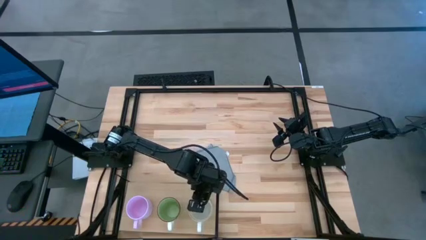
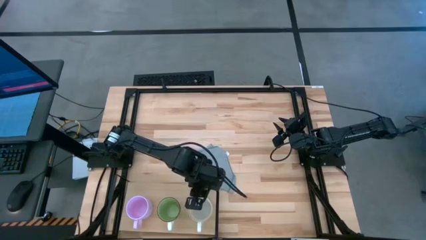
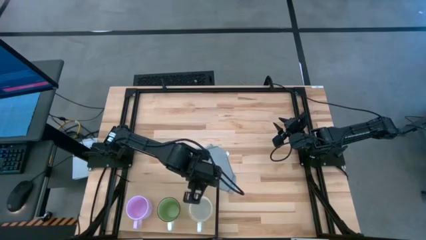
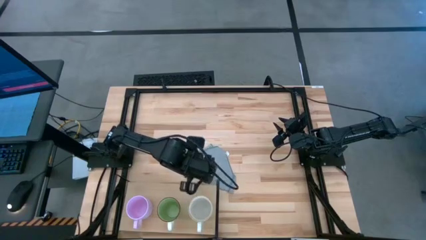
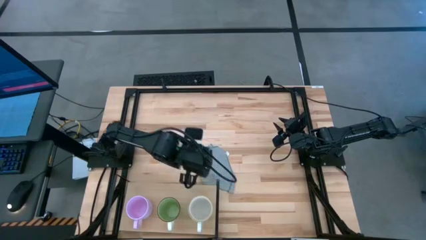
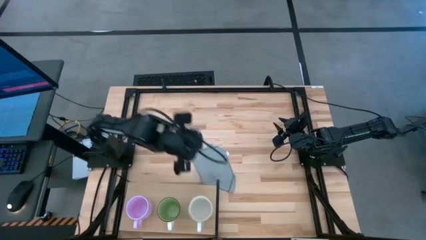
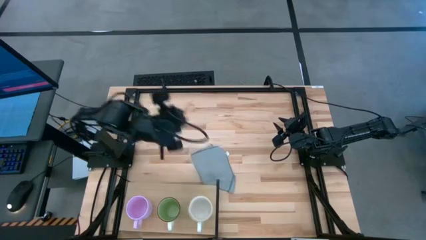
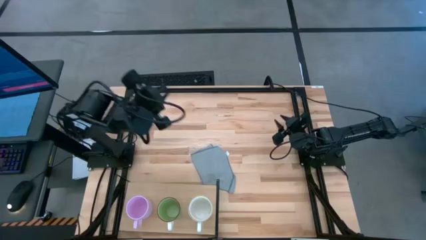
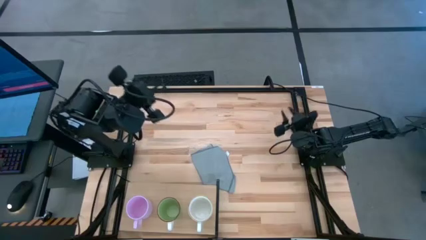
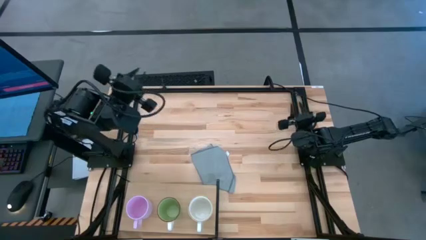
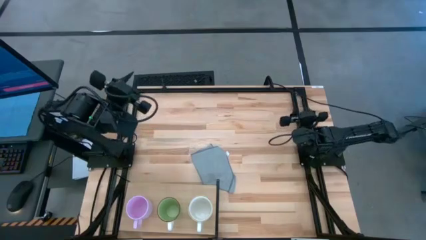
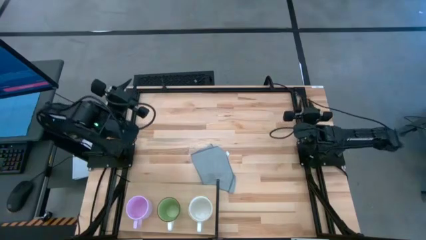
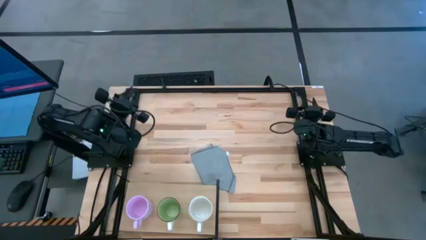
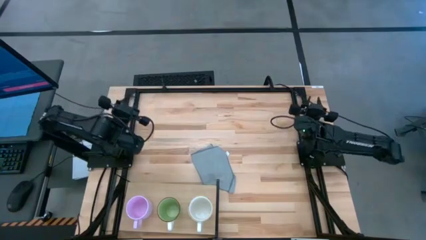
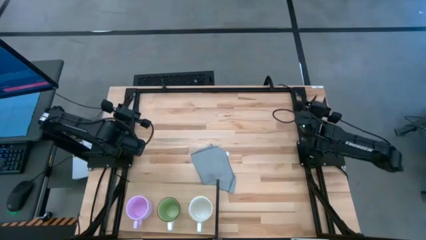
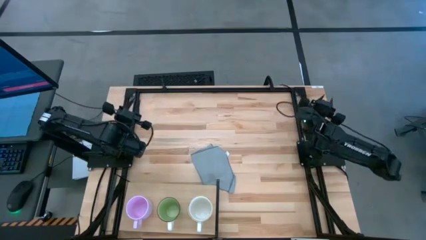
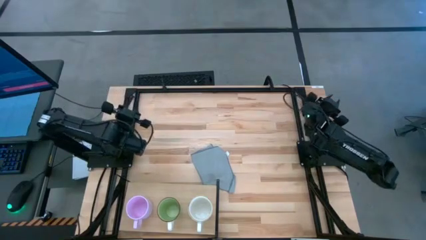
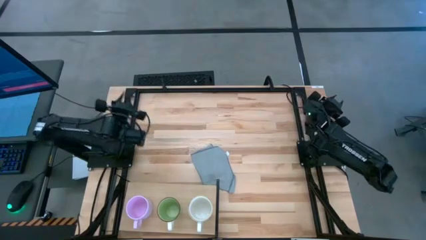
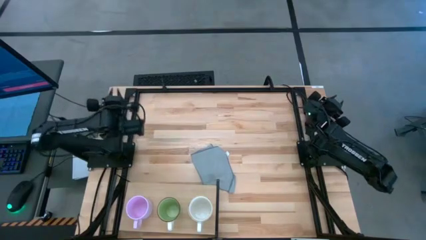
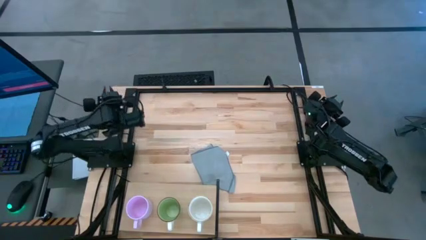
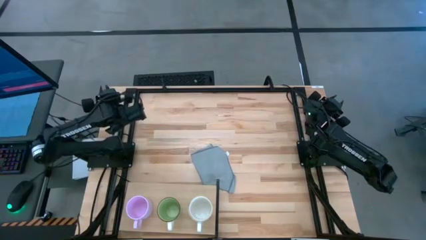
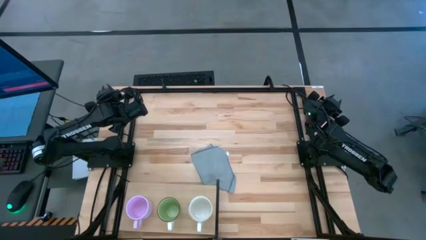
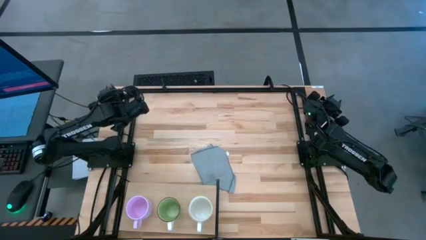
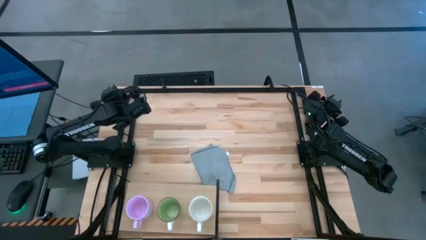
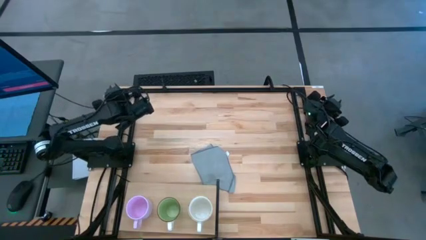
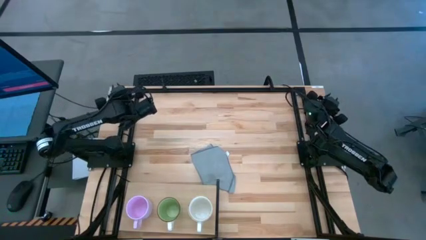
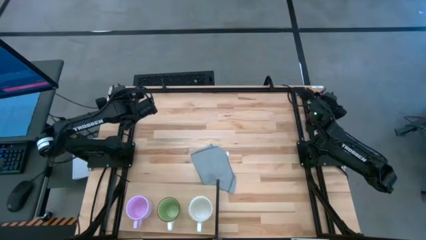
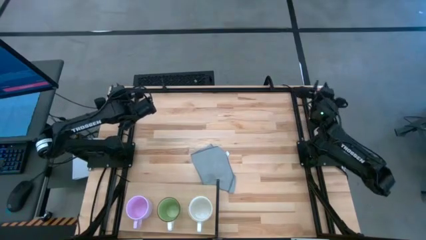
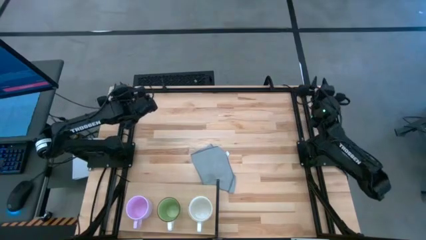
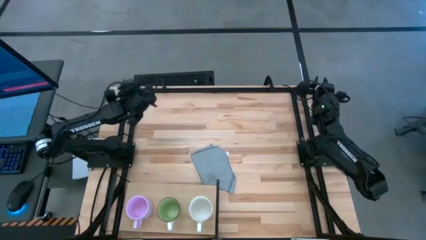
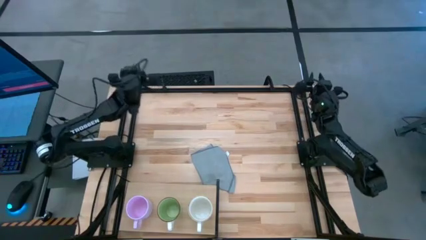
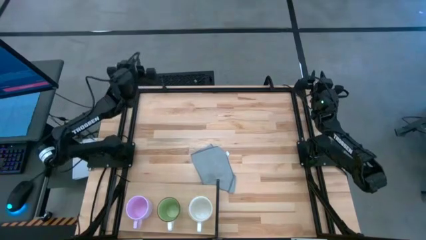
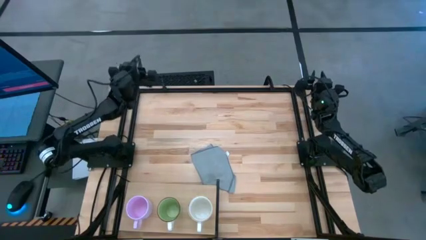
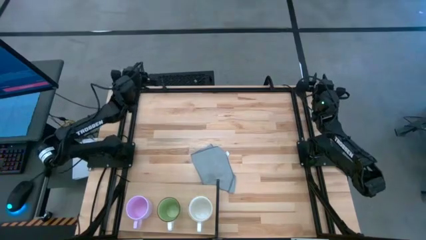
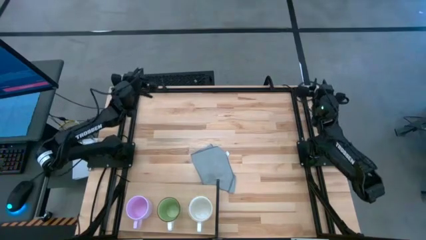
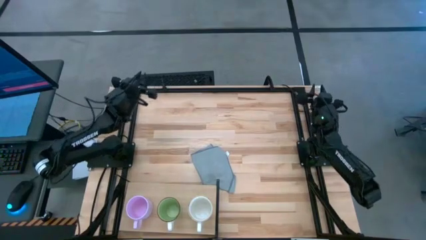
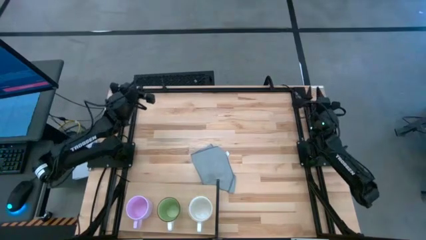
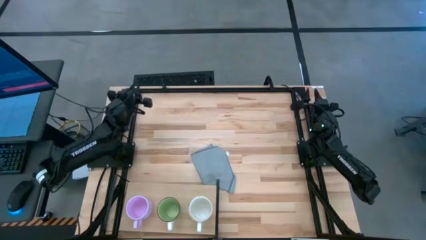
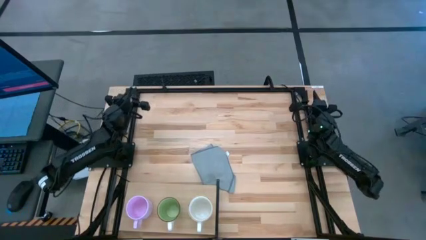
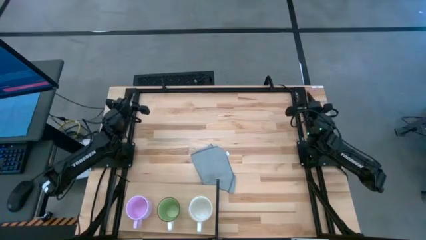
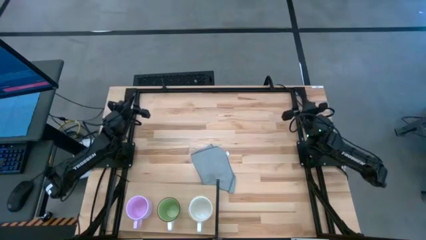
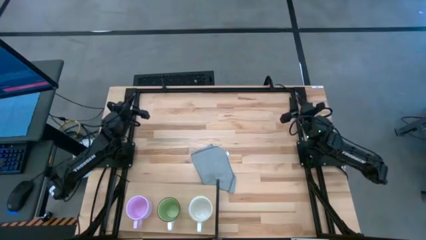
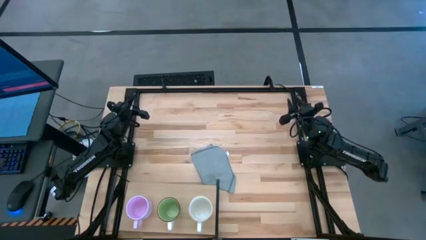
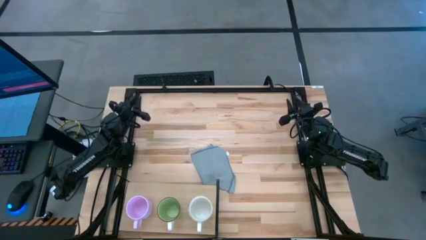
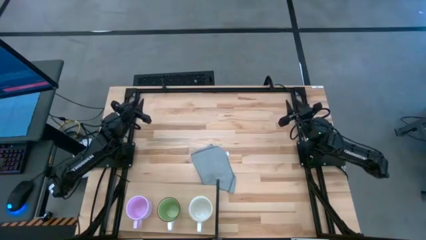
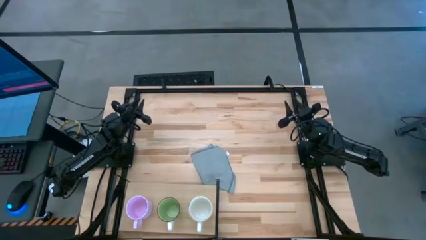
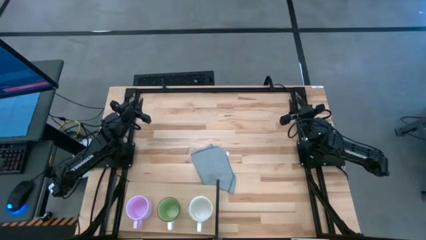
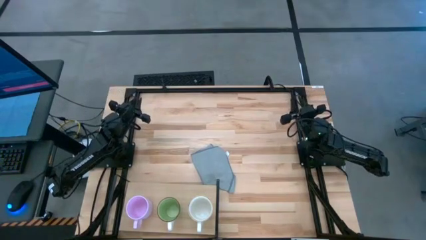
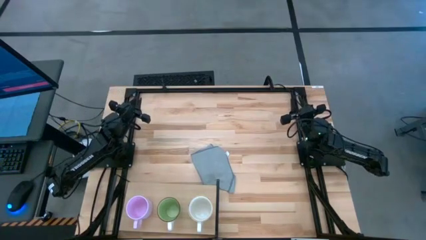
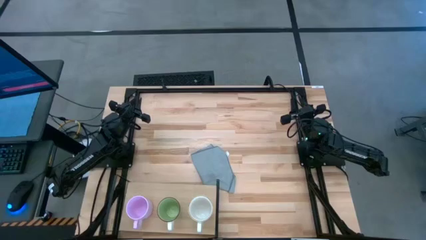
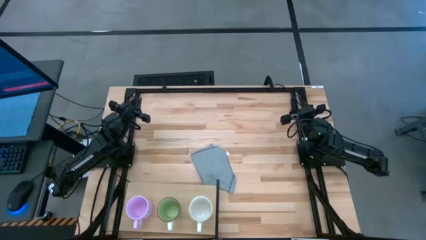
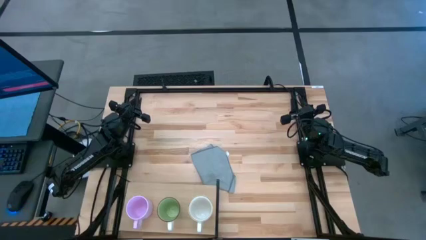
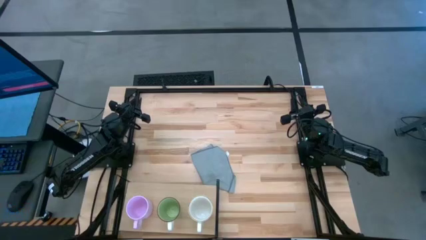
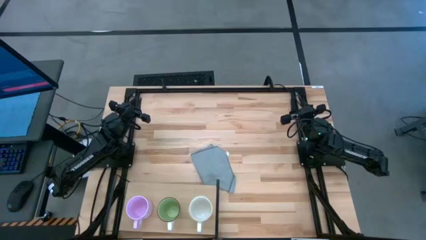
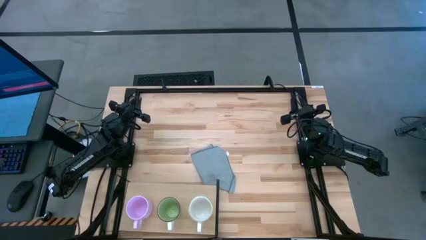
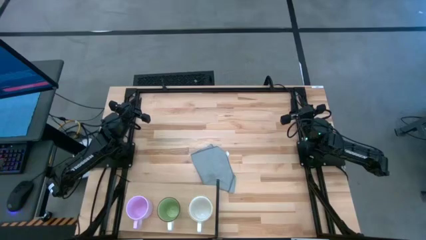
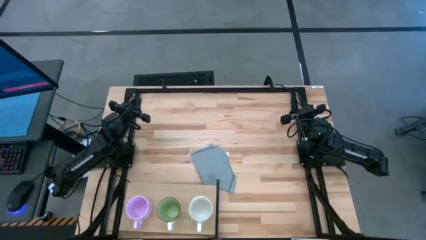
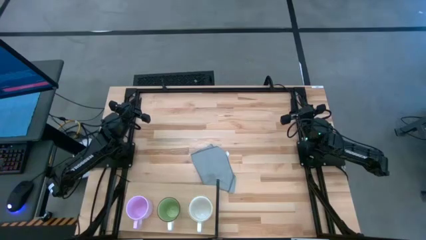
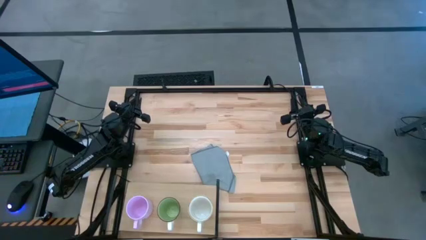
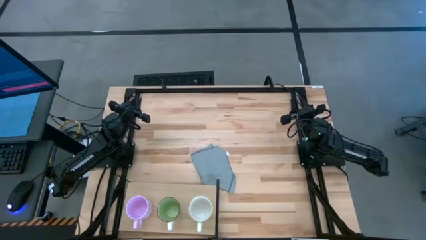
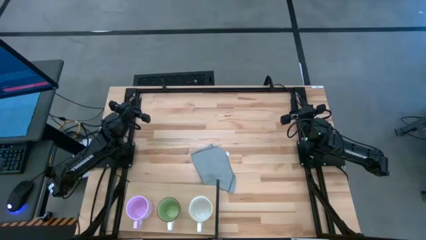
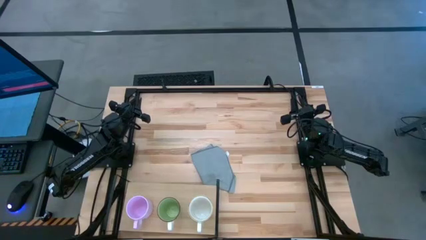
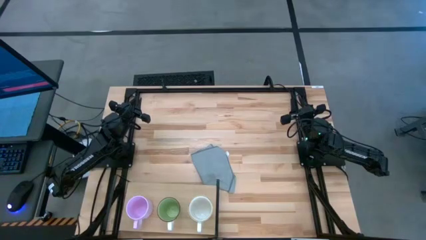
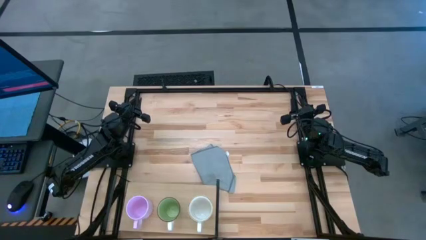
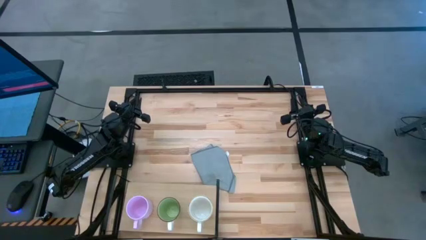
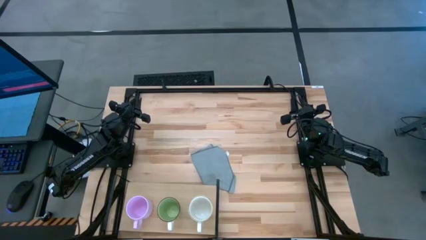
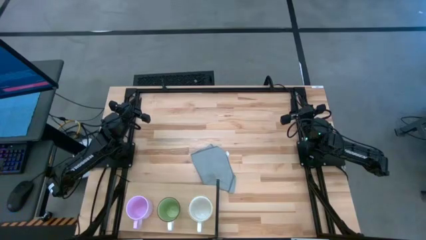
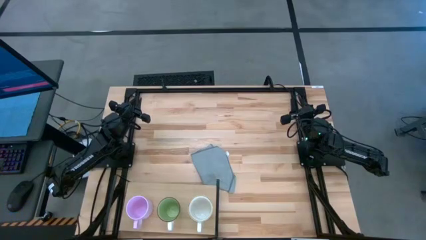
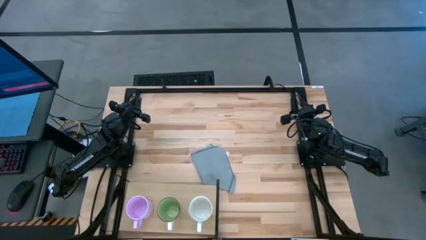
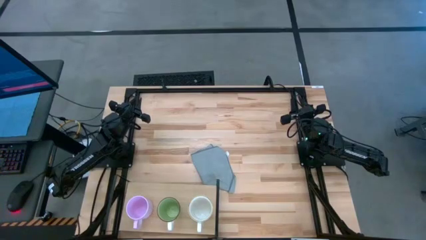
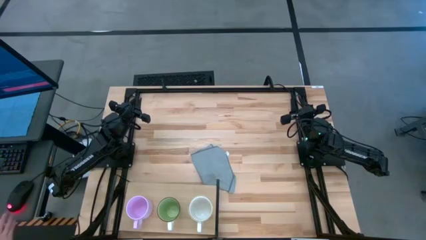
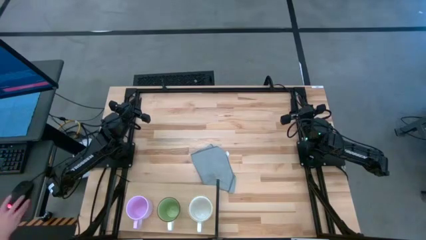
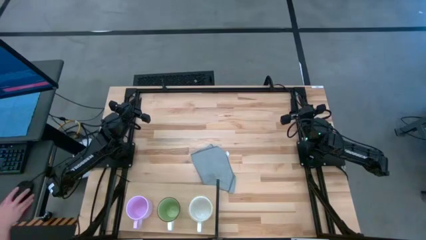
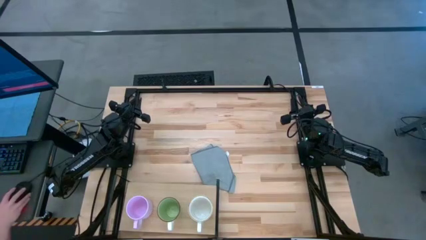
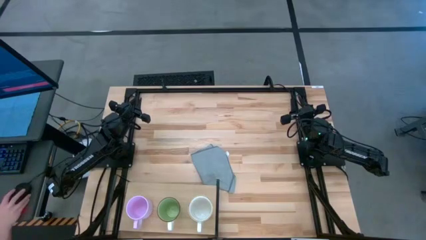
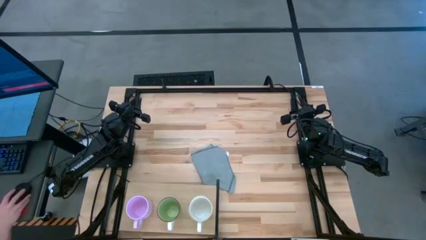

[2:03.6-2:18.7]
Task: Stack small to large cups/mugs on shelf
Return to Home Position
